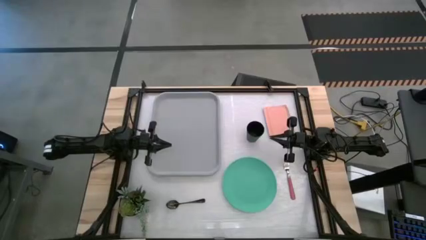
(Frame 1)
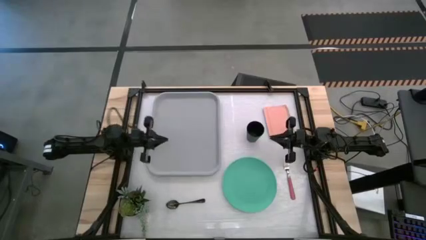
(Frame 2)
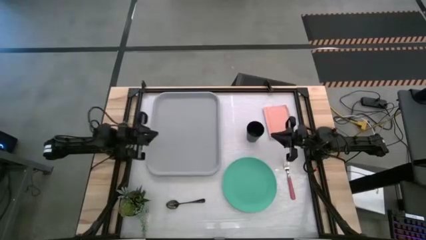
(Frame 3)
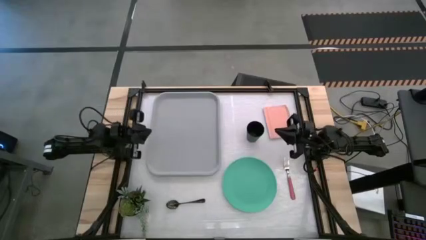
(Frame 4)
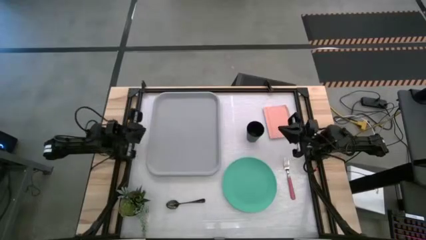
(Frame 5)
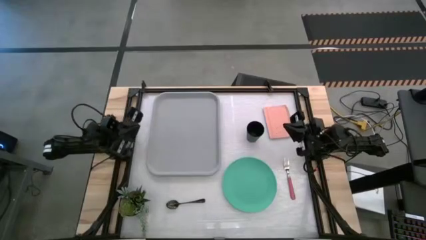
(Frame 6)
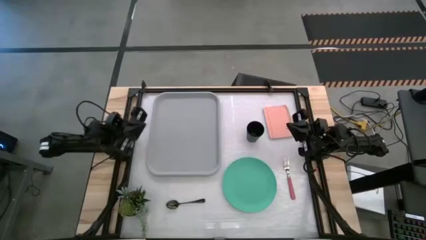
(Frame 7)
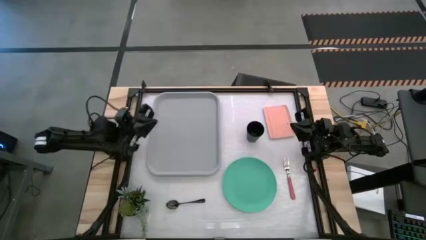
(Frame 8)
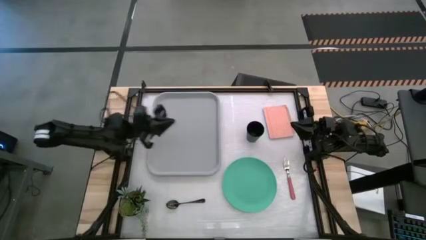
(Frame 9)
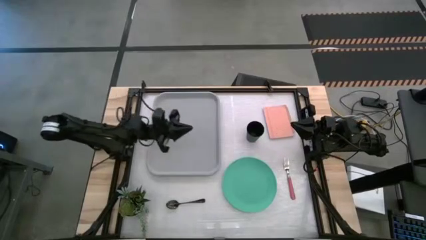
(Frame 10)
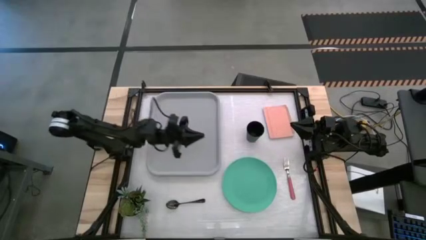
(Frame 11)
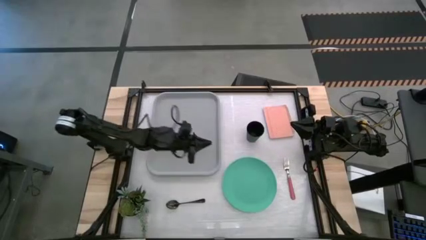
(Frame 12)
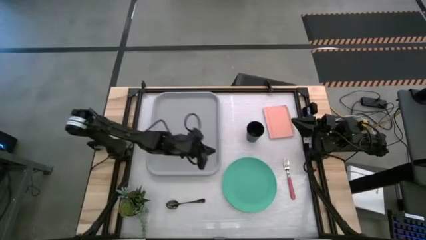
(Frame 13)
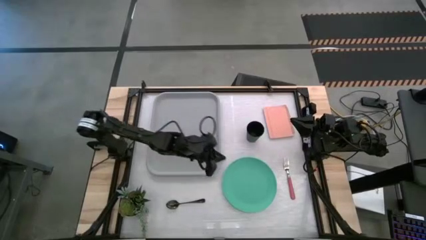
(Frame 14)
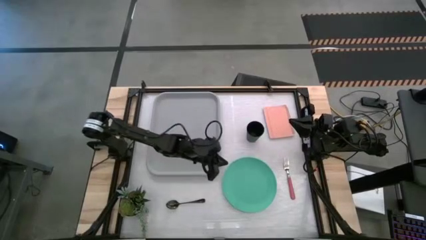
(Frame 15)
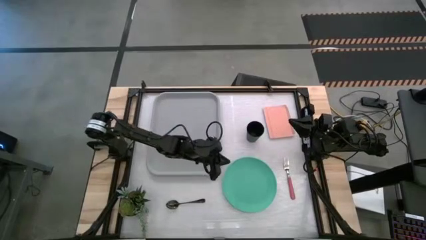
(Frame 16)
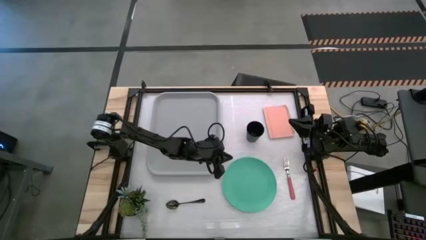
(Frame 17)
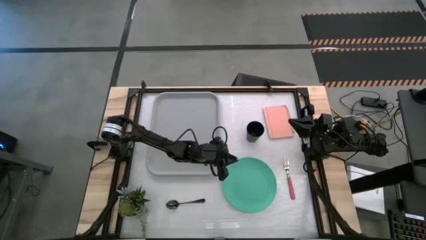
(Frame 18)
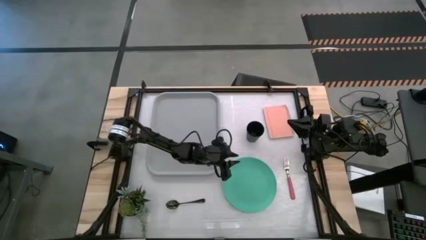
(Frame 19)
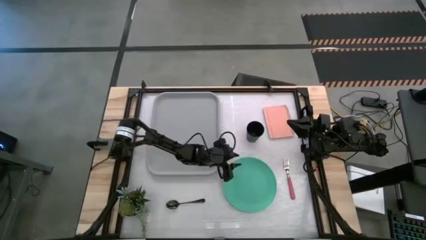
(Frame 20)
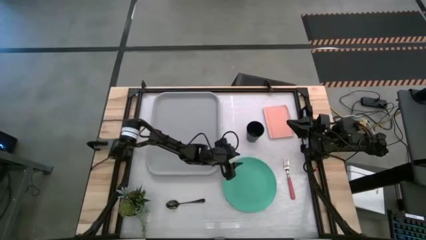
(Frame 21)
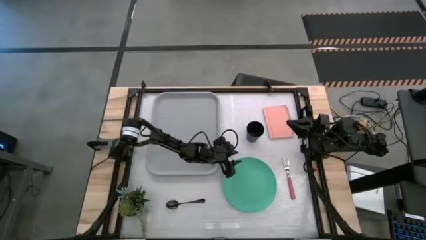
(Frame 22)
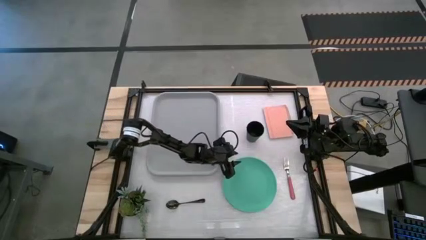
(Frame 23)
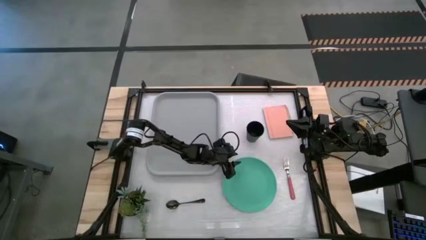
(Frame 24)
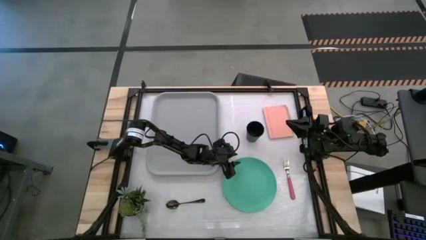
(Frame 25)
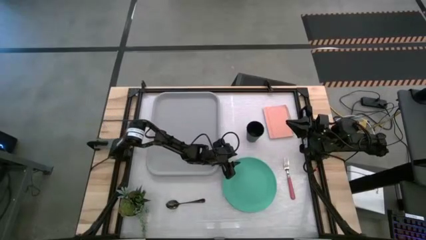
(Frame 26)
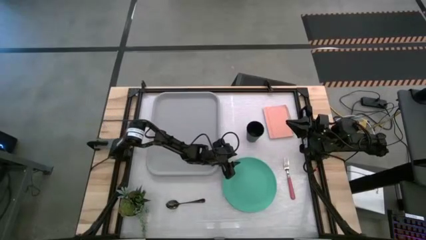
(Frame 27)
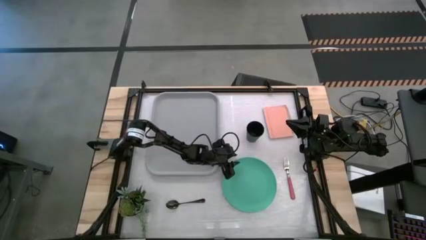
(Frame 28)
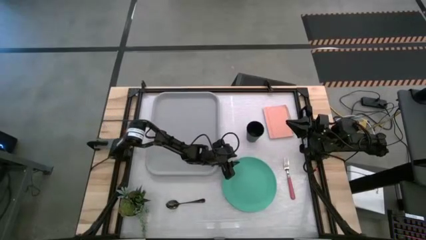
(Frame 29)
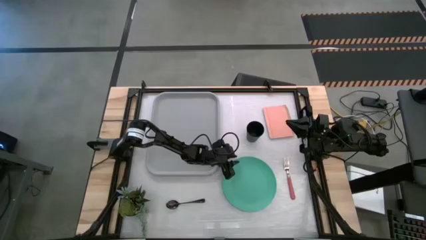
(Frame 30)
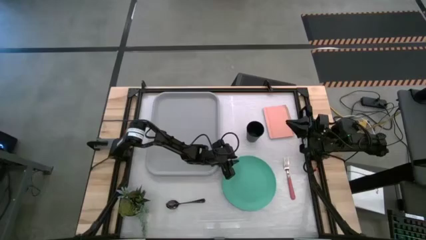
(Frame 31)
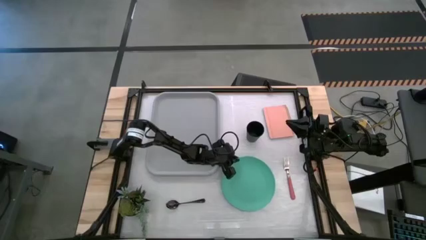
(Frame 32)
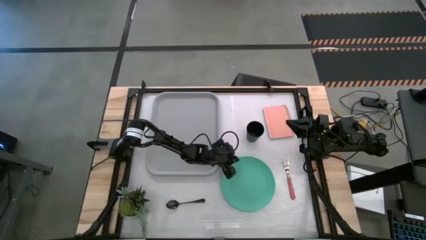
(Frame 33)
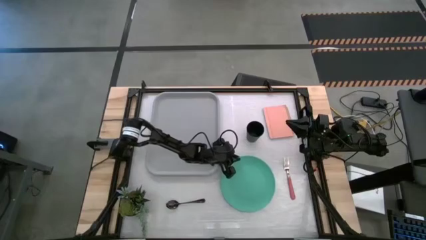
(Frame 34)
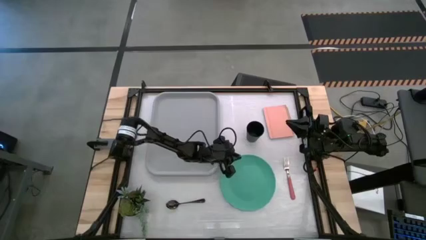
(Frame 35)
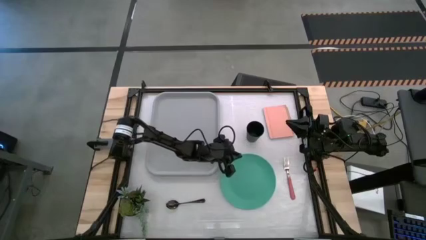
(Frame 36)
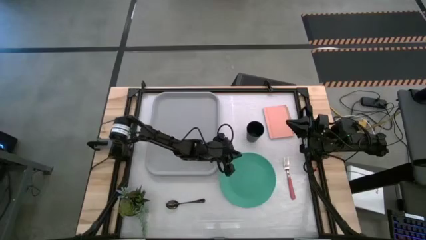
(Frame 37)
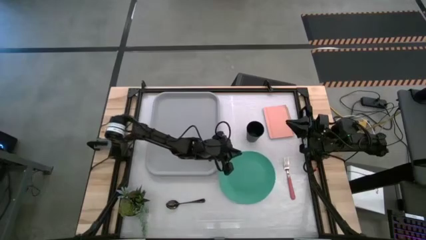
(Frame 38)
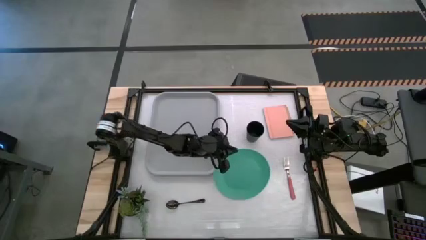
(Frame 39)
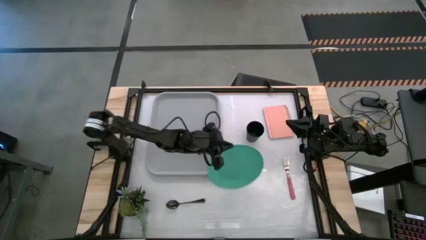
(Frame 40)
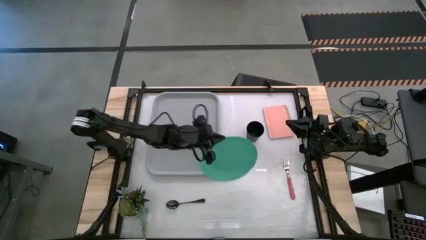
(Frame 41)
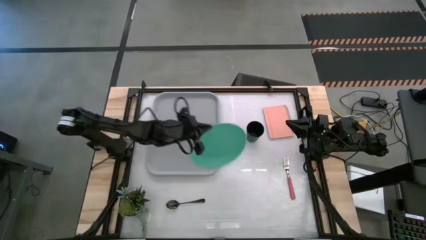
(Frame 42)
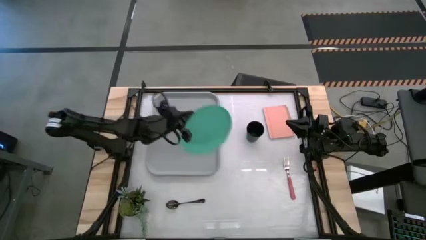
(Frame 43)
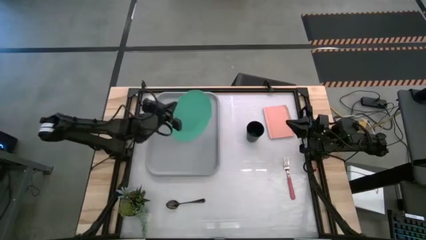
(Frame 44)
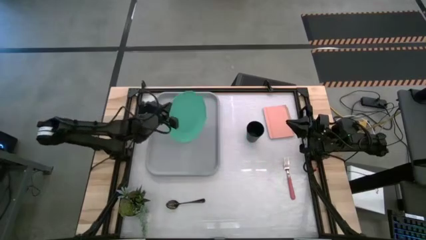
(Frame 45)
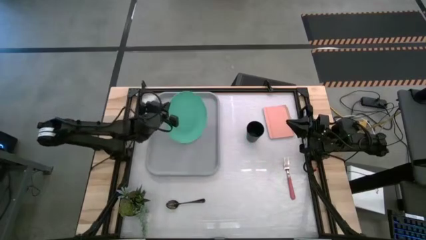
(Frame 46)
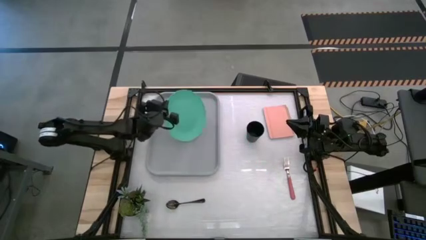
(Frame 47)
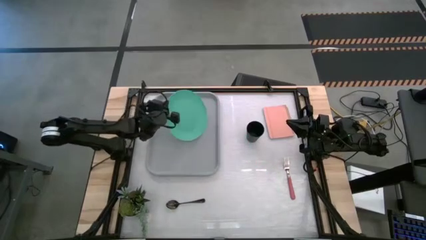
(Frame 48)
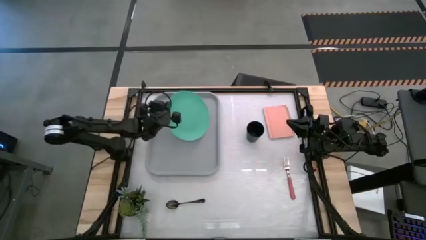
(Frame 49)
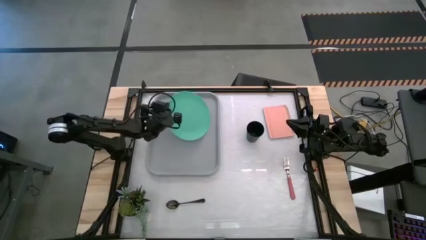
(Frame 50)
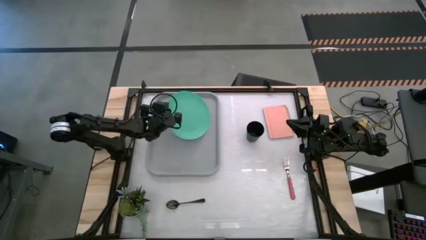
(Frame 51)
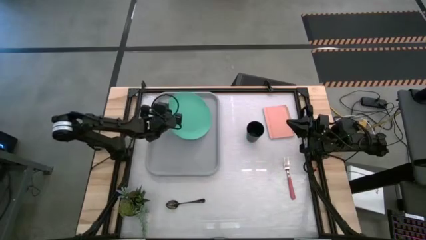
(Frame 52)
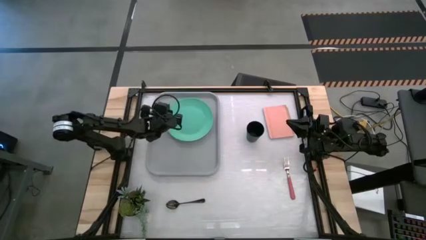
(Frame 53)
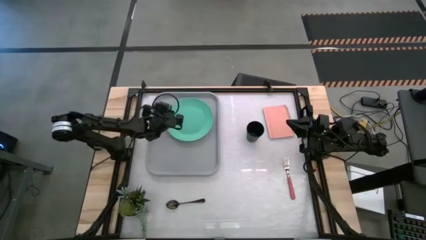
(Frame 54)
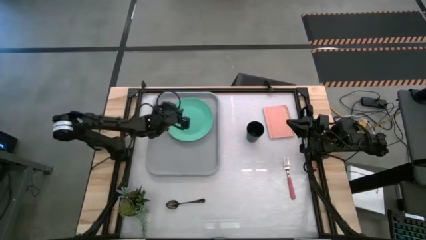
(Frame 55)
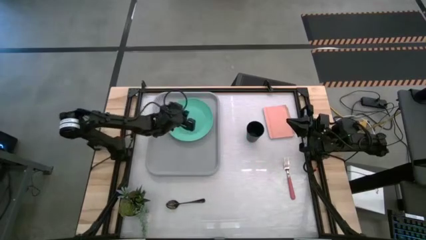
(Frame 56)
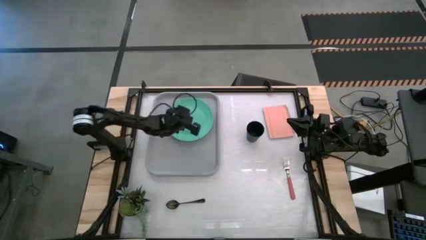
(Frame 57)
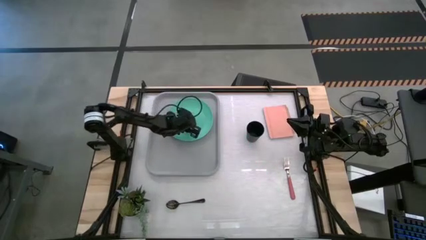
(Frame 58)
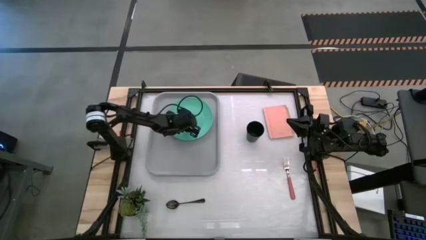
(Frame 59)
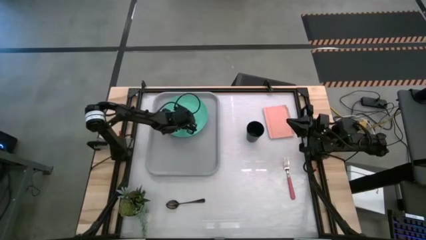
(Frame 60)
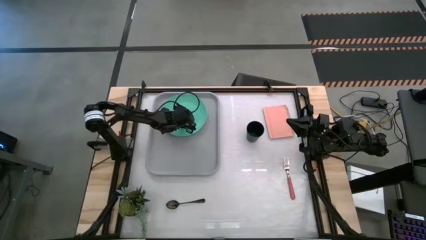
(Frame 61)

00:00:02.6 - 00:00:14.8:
Task: Pick and place plate/cup/fork/spoon on tray
Put the light green plate on the gray serving tray

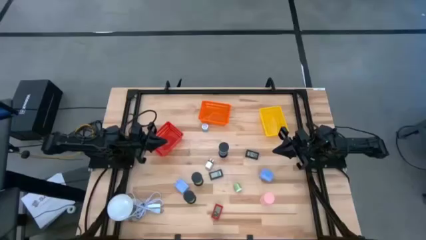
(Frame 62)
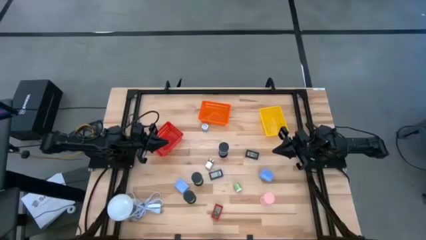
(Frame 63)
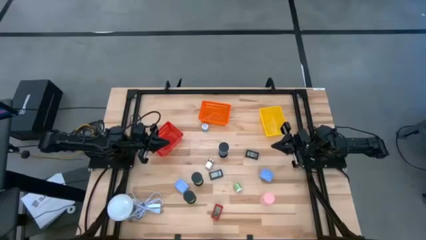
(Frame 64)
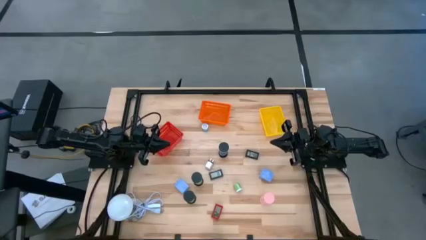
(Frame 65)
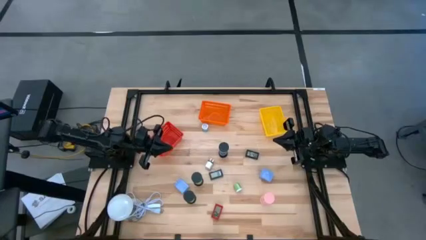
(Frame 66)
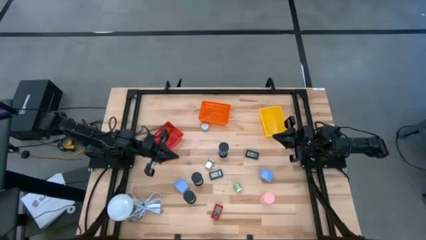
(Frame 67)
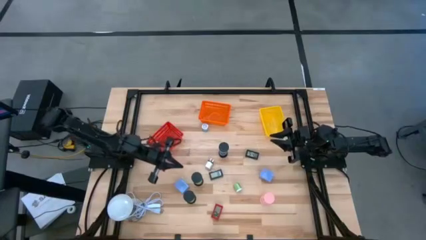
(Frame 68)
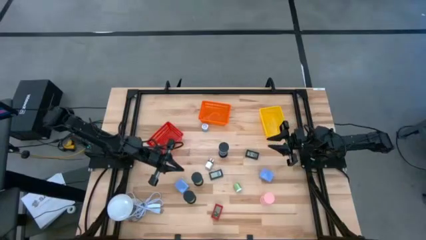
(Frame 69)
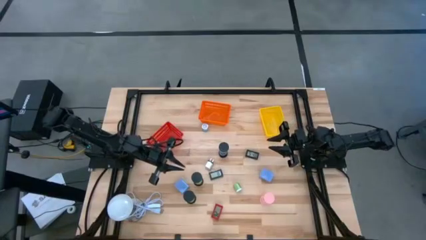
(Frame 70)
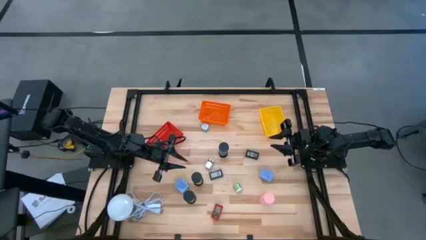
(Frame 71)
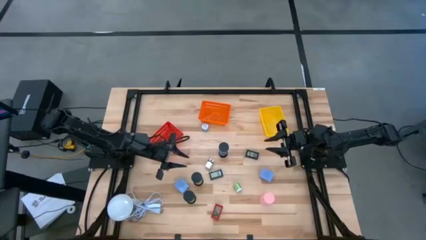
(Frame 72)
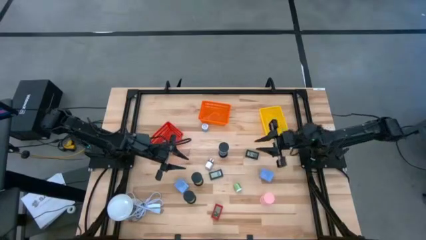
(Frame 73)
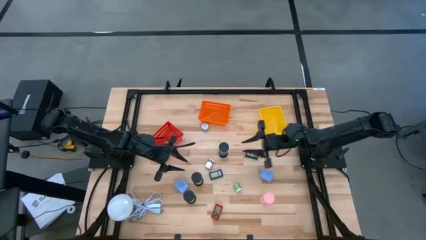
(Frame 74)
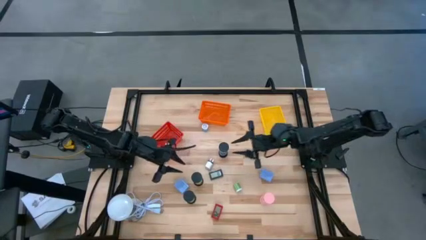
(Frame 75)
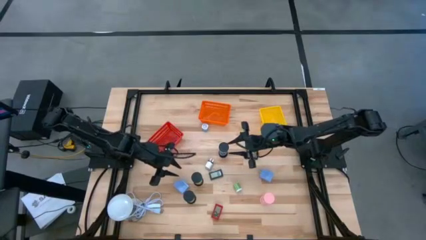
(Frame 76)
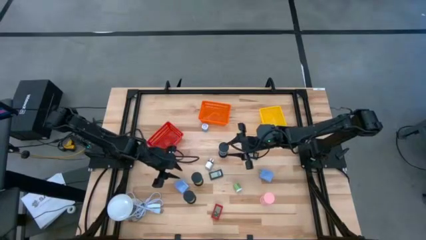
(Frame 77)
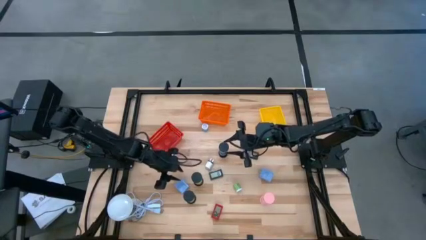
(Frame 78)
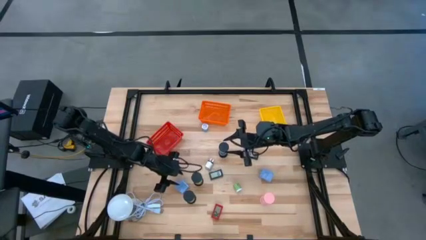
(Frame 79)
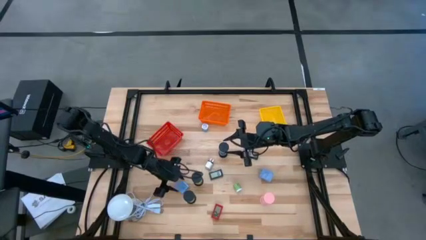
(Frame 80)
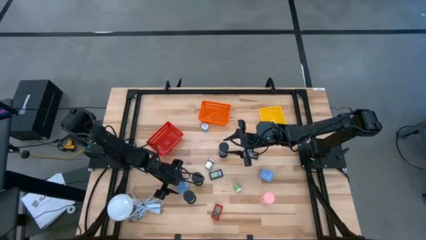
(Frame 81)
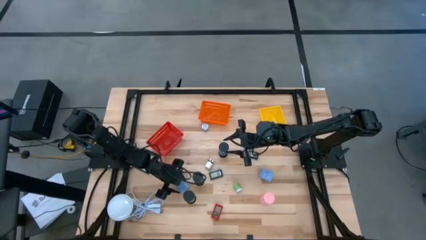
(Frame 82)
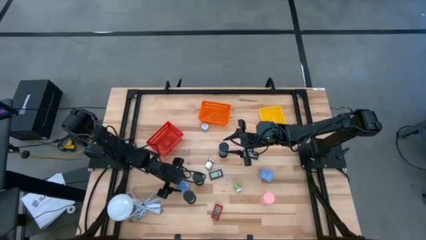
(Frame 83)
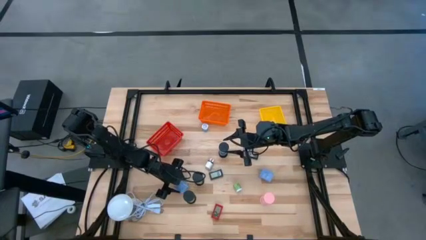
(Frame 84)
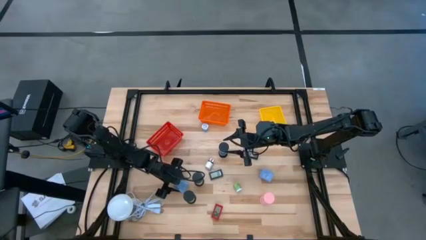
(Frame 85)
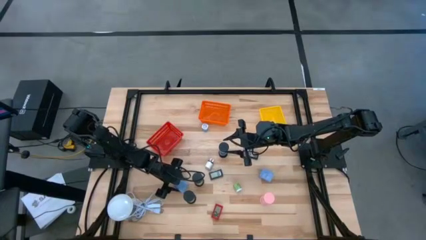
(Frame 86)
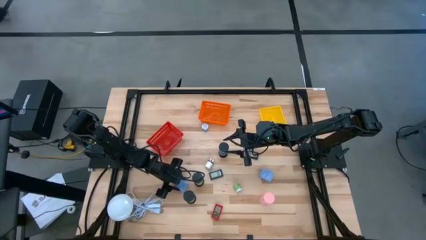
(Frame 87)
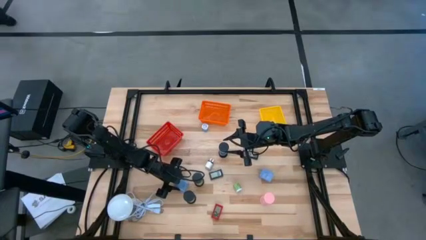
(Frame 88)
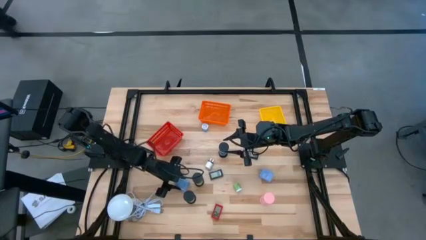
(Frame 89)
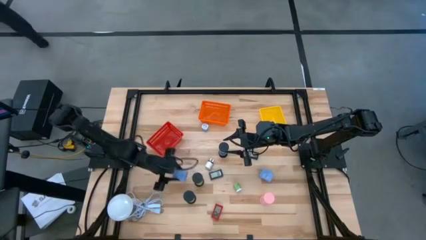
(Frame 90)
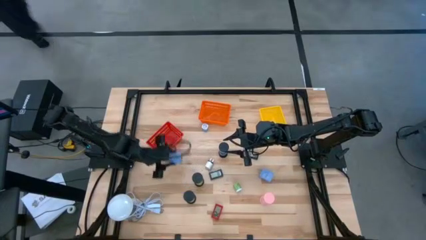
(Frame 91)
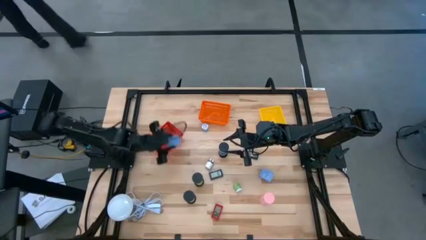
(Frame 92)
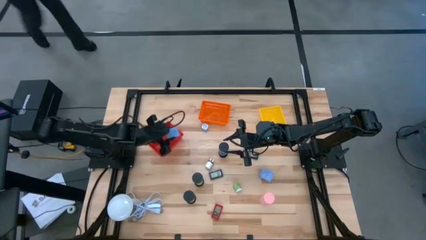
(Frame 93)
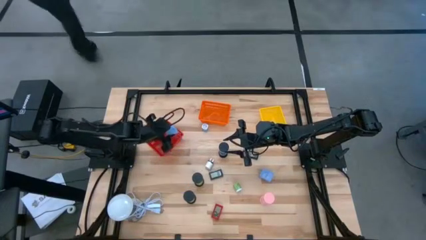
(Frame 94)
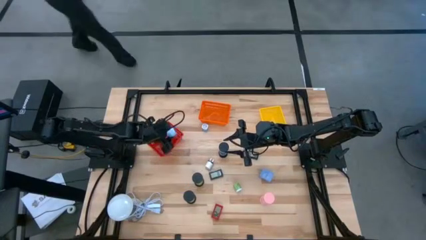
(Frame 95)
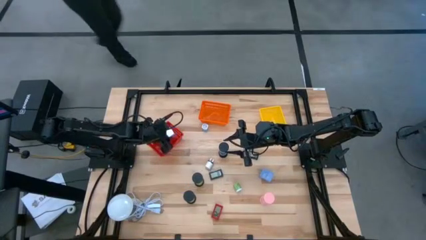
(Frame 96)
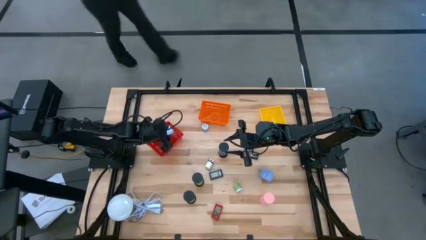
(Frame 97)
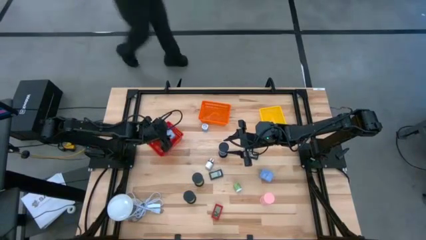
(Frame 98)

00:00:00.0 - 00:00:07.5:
Task: Pick & Place Office items
Put the left light blue charger adapter into the red basket
